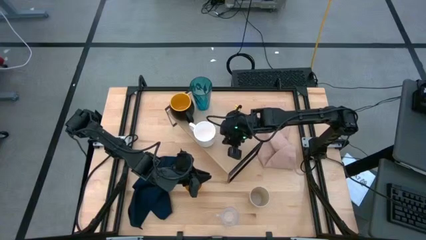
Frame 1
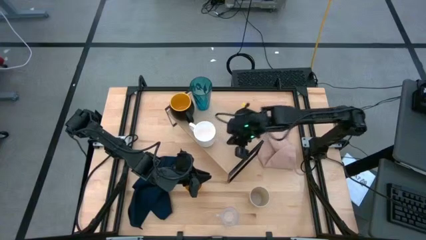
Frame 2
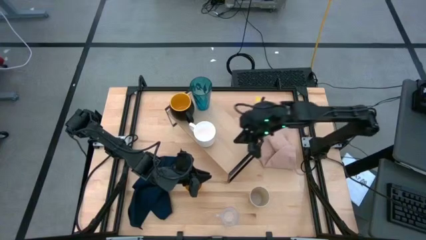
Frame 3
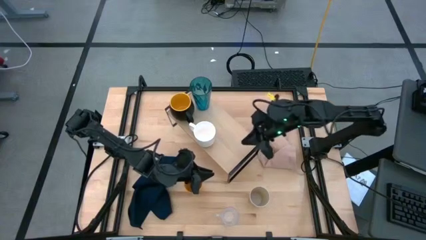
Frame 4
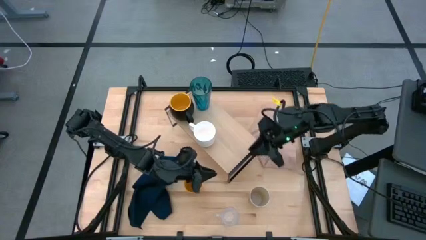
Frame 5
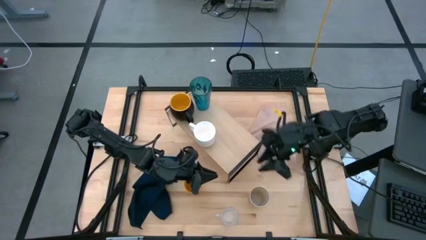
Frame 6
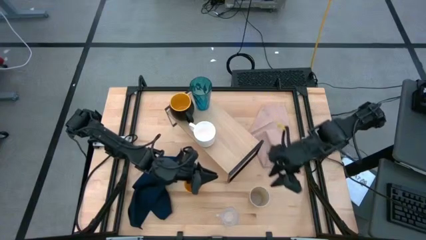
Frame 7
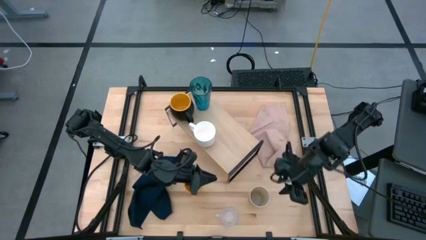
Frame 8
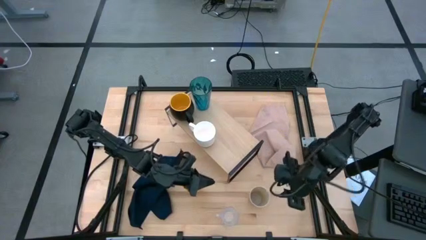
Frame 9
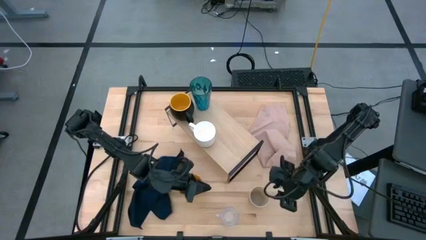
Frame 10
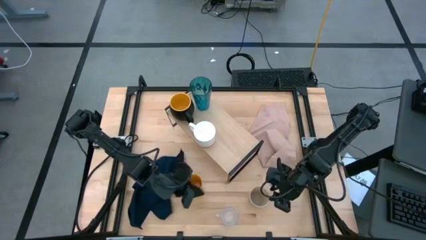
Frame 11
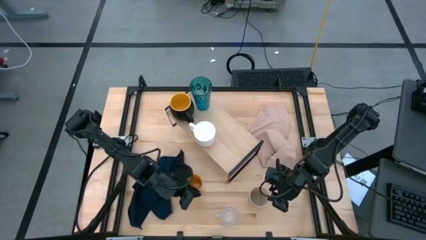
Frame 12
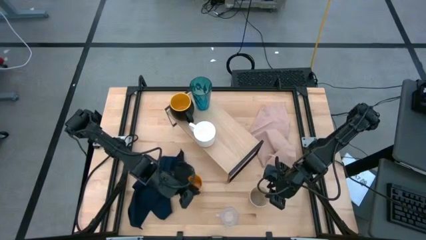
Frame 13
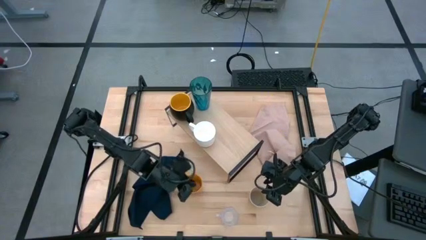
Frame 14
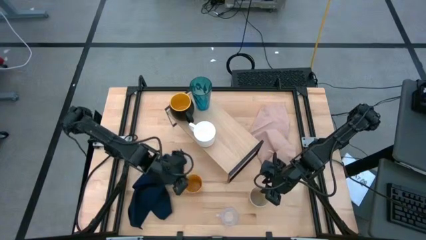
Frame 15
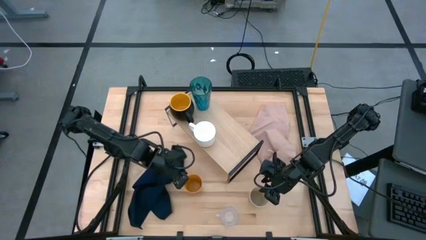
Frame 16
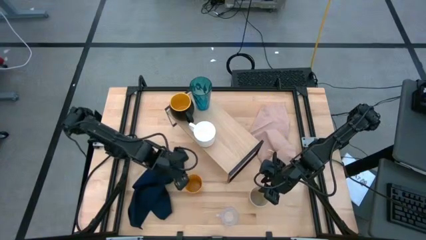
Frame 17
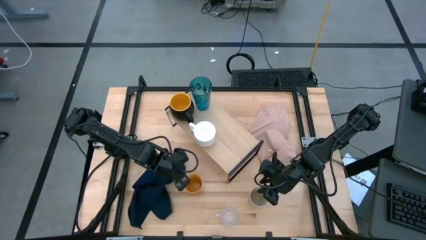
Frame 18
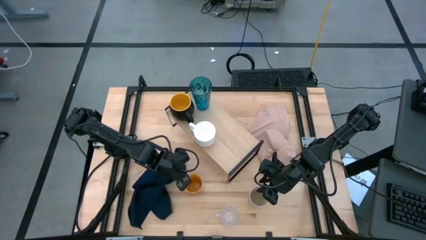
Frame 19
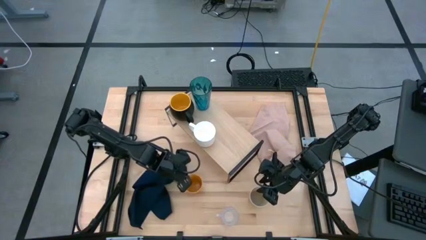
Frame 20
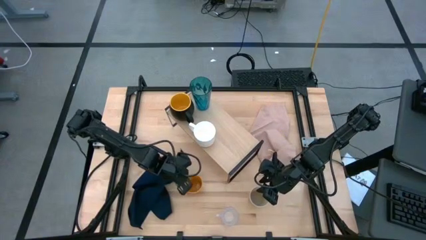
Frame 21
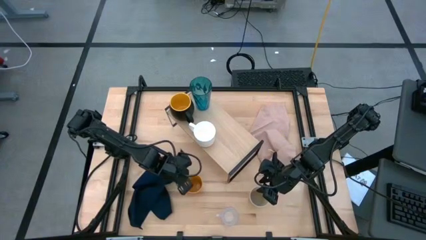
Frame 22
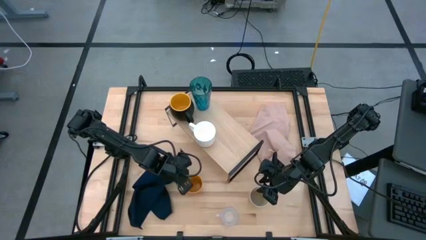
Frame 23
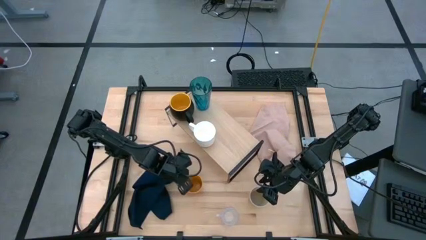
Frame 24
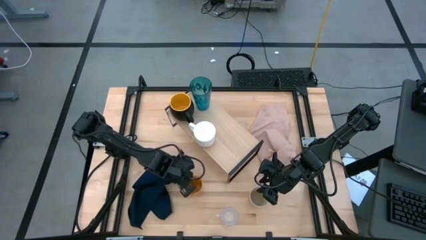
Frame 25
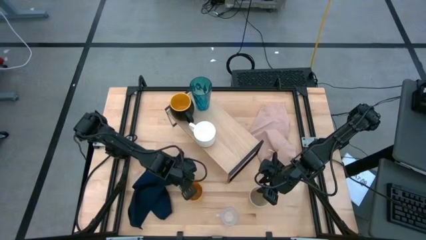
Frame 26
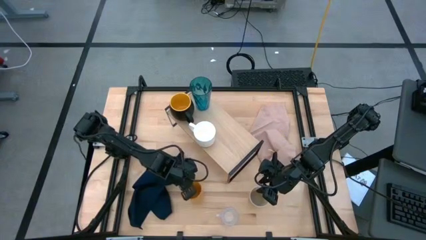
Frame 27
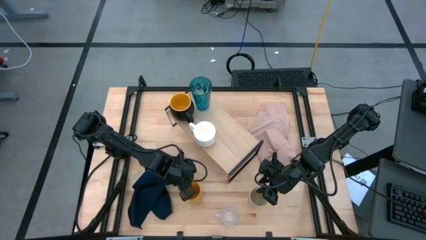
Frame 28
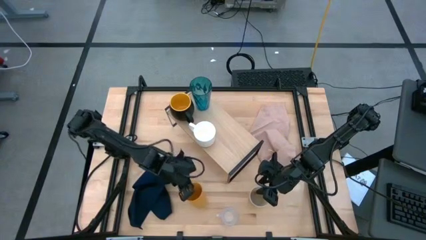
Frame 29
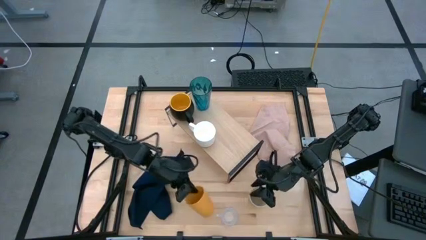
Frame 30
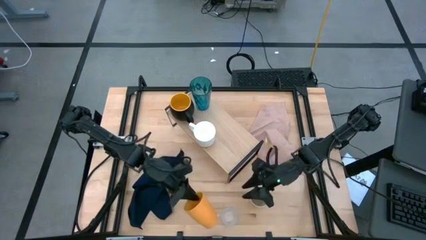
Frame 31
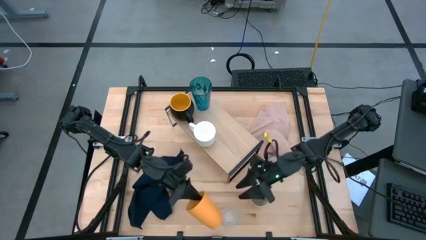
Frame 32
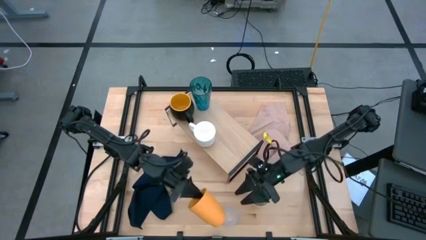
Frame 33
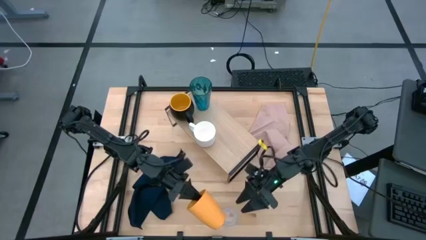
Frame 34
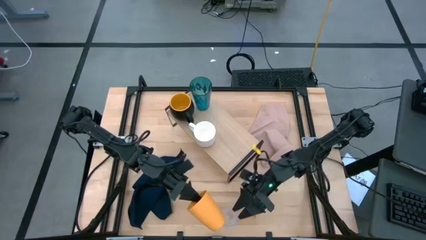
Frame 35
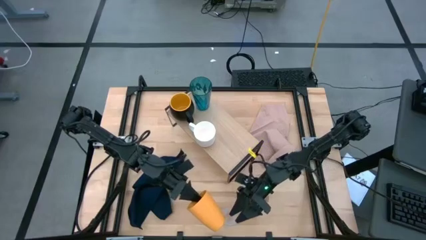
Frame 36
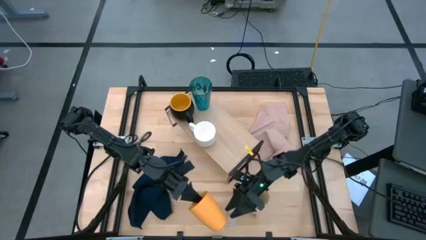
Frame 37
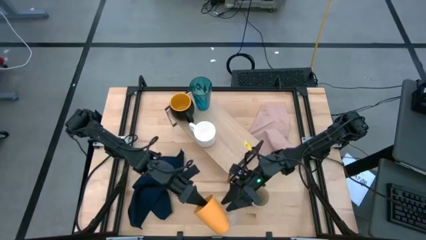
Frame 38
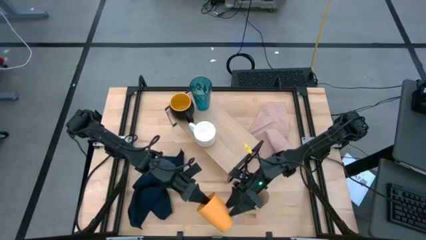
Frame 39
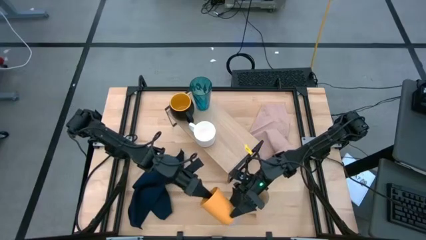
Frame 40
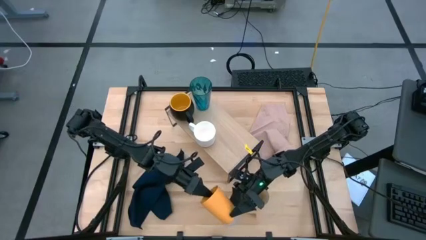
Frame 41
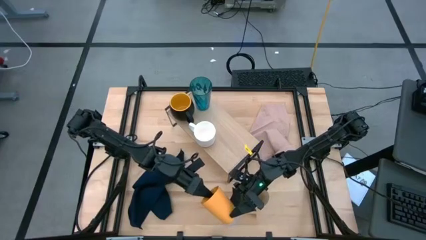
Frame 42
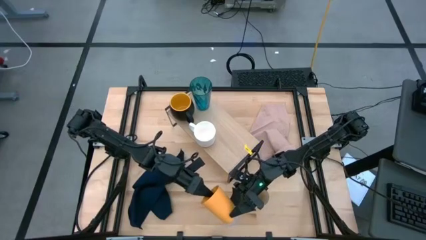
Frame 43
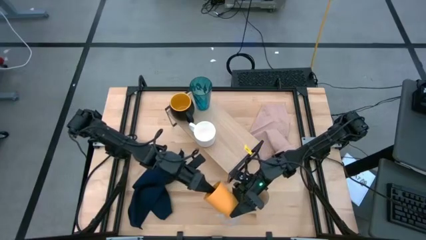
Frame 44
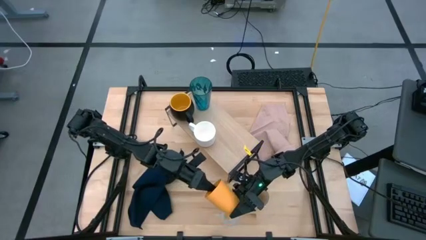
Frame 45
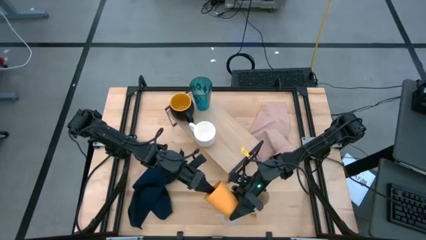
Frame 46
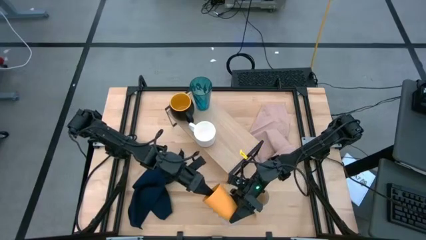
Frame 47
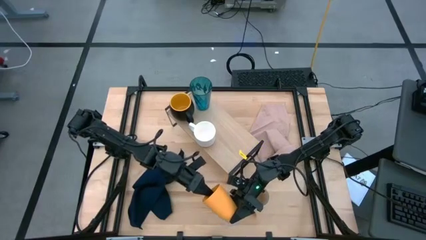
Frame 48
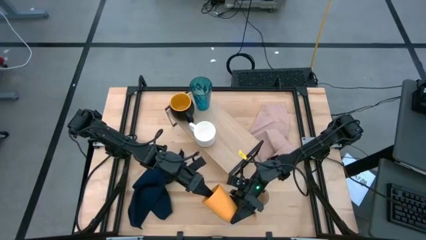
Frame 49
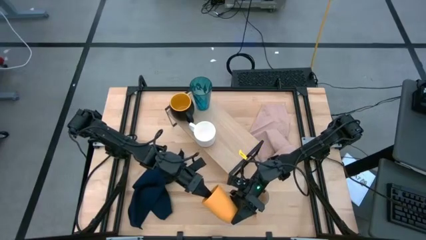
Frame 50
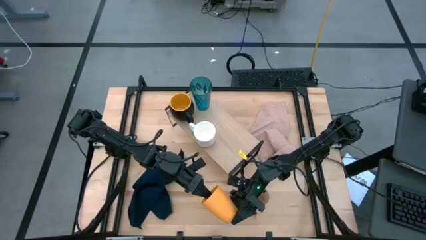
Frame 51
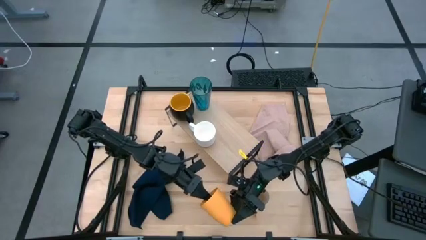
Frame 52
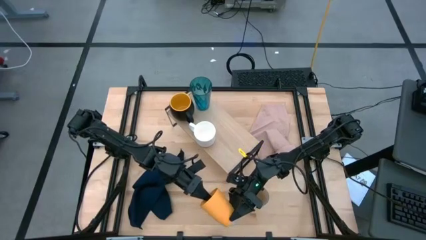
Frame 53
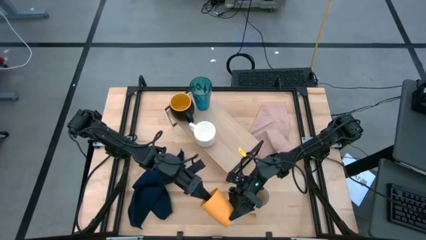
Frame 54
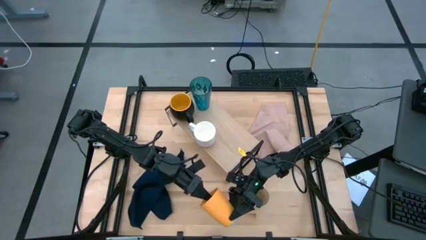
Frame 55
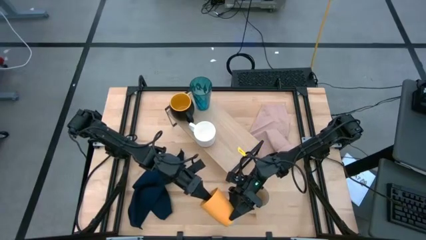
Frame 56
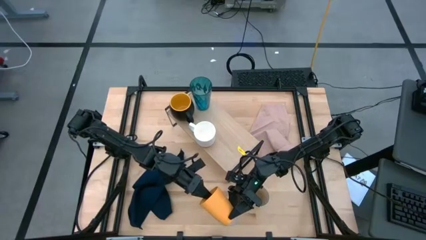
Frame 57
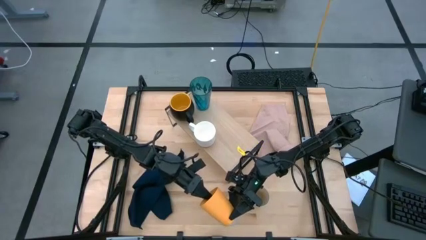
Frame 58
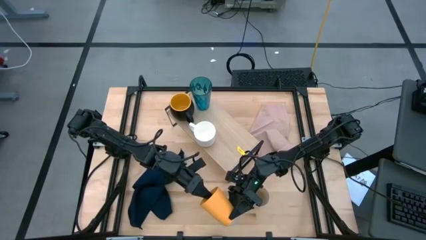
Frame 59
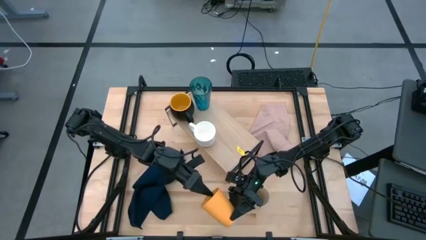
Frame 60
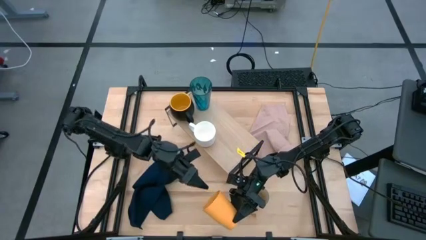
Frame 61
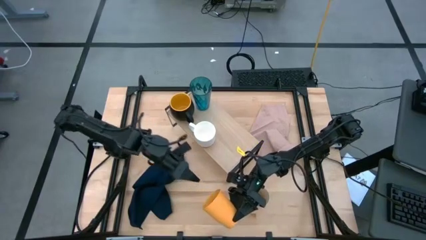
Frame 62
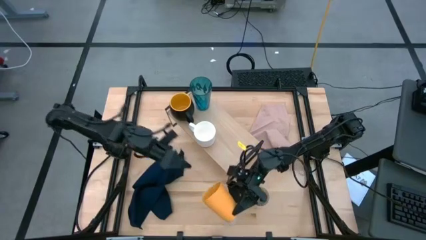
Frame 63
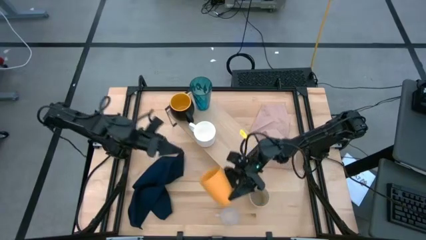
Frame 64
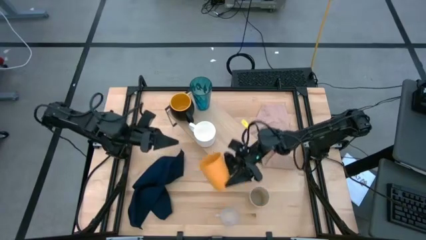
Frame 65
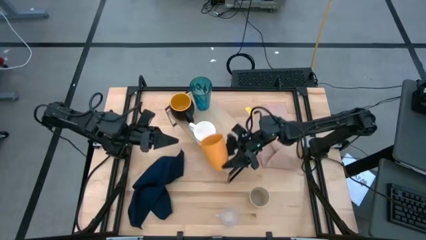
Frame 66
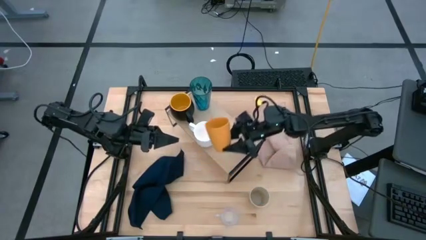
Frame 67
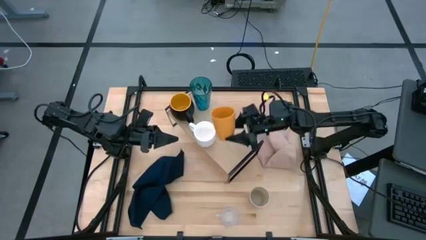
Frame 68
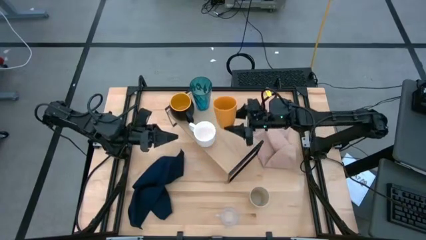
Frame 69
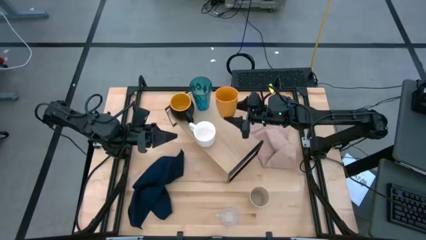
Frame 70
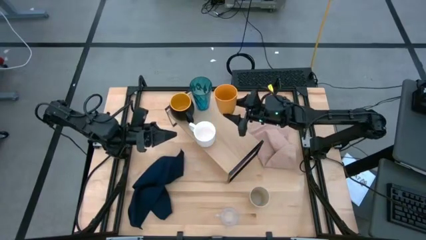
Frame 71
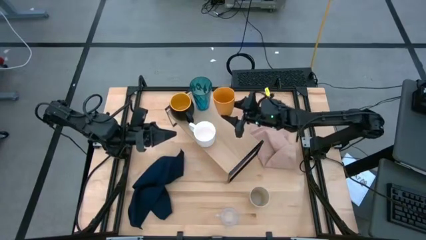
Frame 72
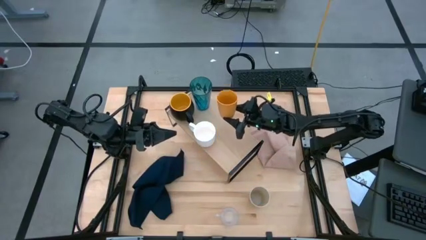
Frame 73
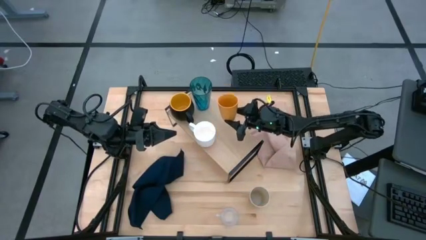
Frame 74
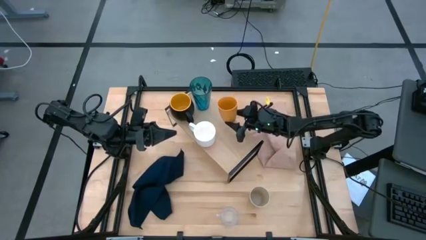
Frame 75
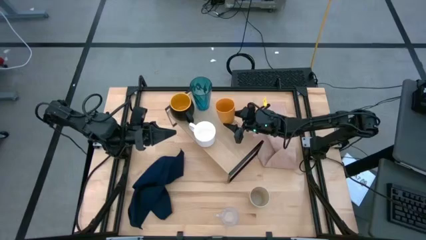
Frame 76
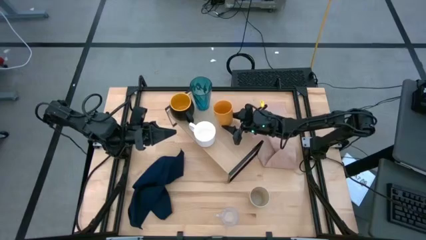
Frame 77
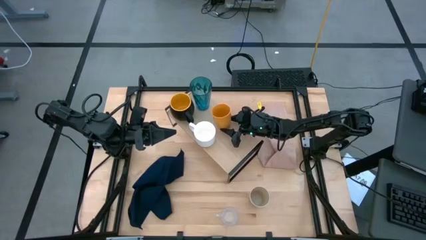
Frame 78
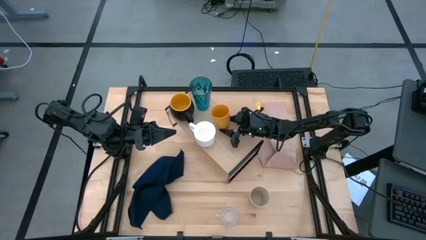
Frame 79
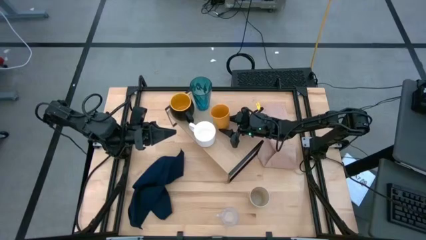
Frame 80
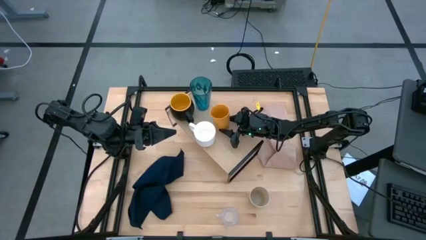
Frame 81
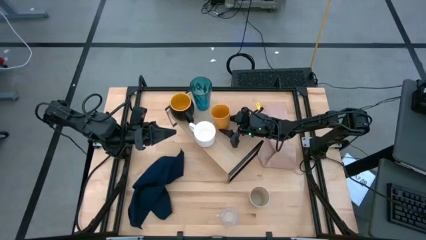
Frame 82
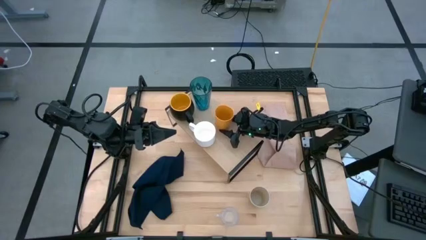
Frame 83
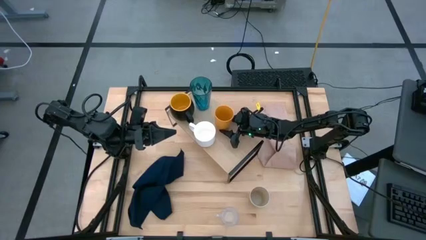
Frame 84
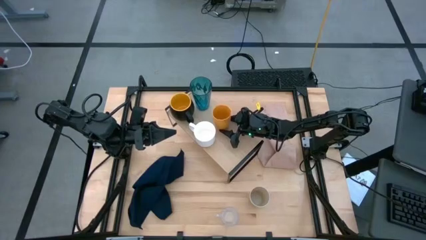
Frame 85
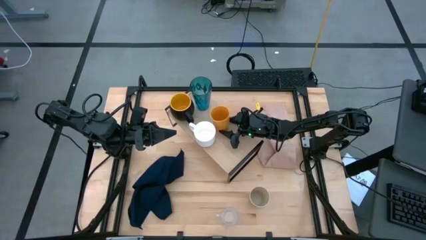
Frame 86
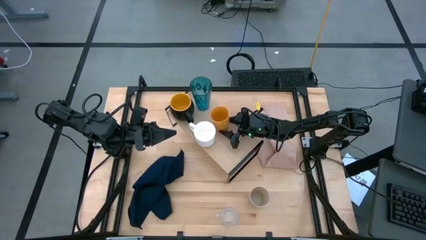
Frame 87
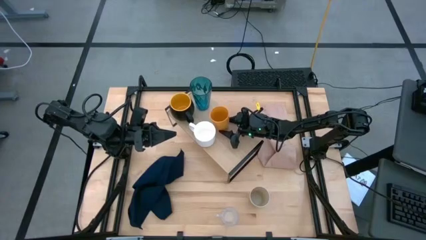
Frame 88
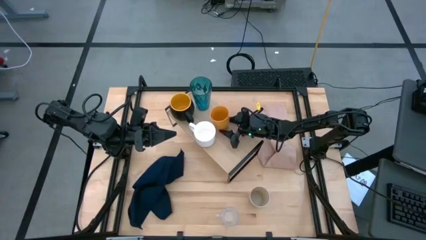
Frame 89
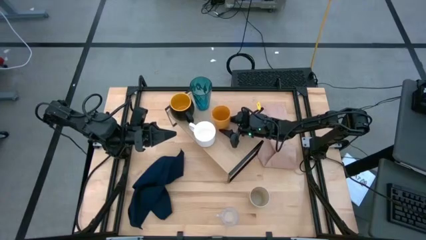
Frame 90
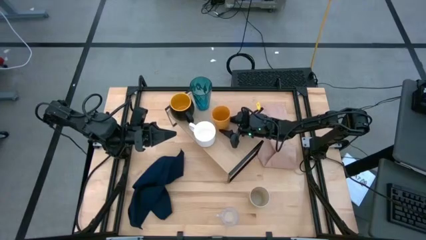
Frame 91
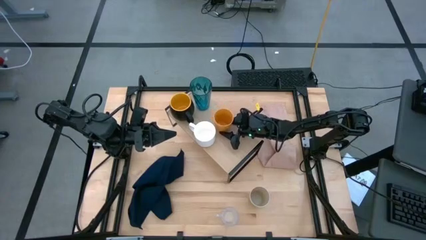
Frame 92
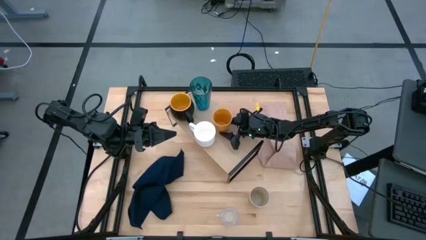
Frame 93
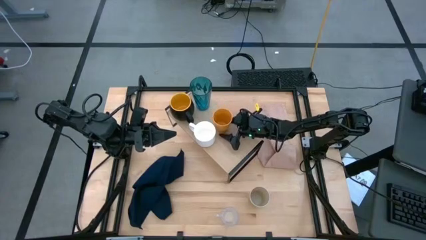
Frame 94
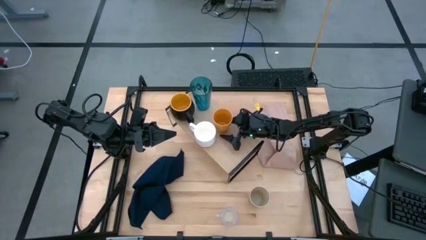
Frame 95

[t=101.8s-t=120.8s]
Task: Stack small to large cups/mugs on shelf
Put the yellow cup on the shelf
